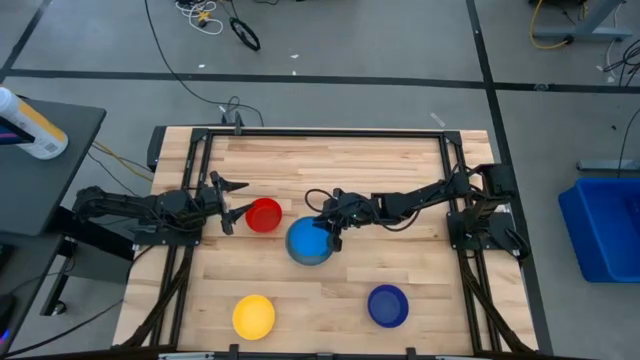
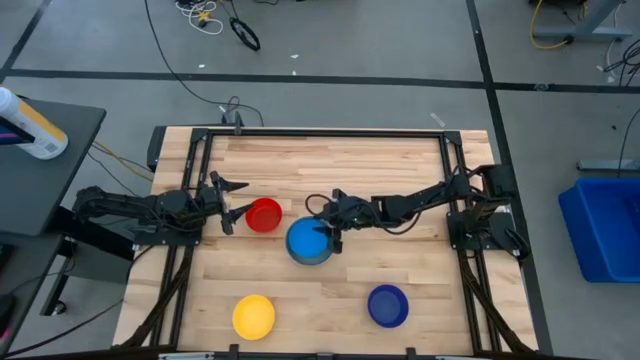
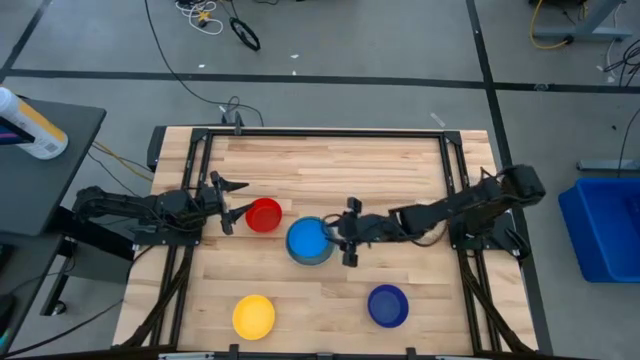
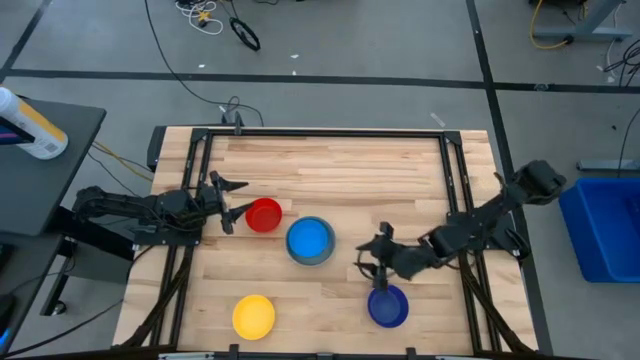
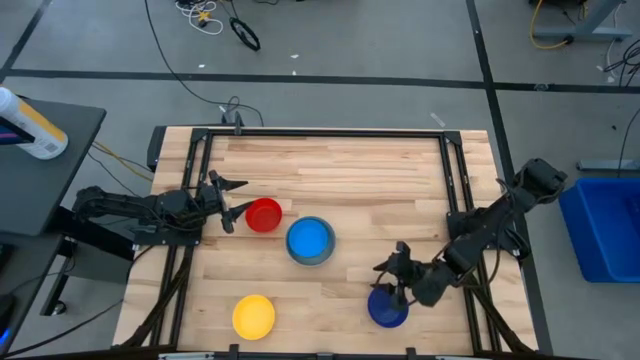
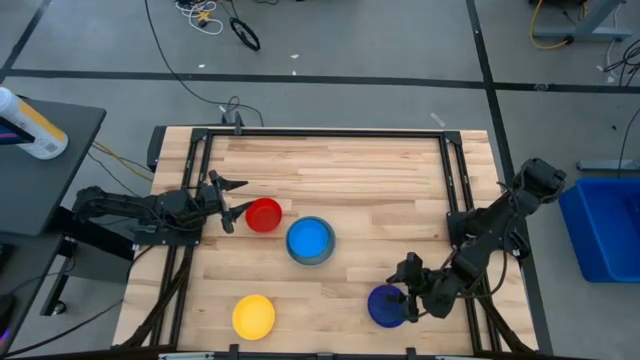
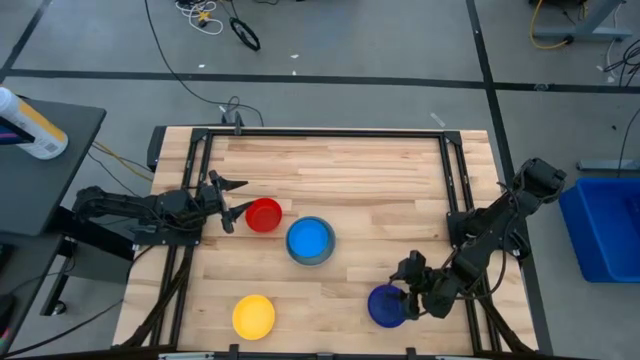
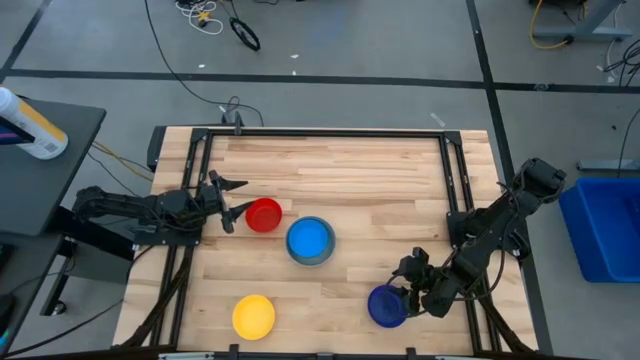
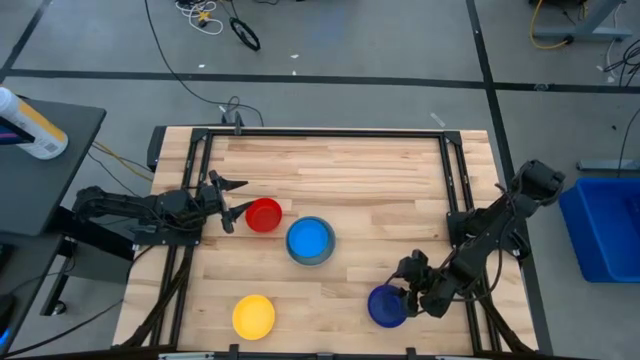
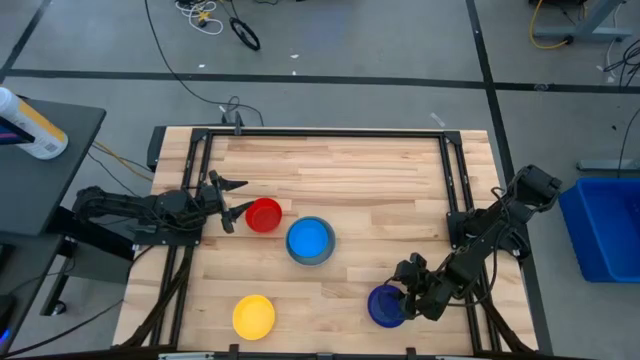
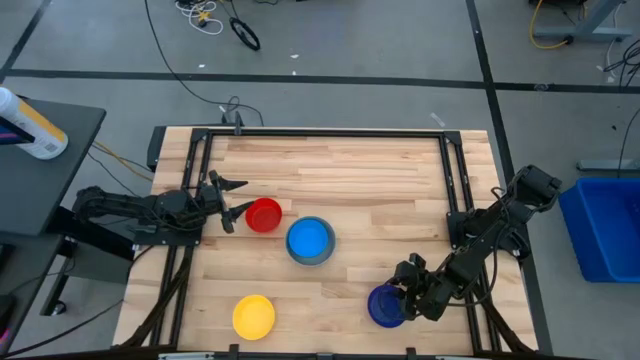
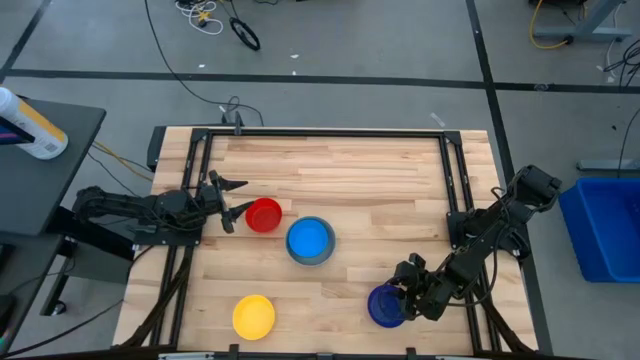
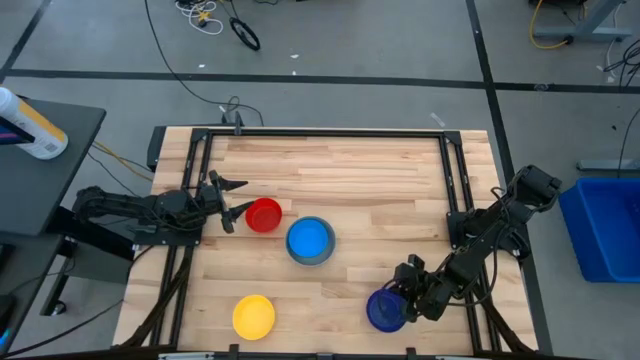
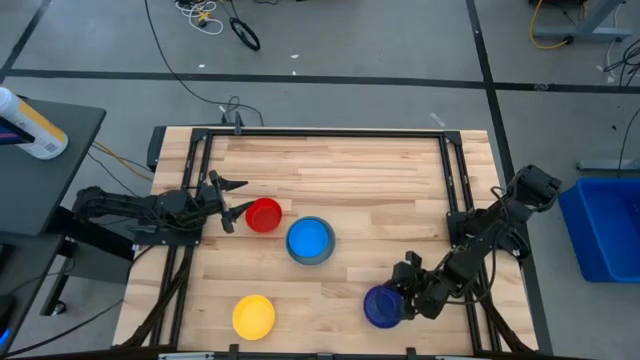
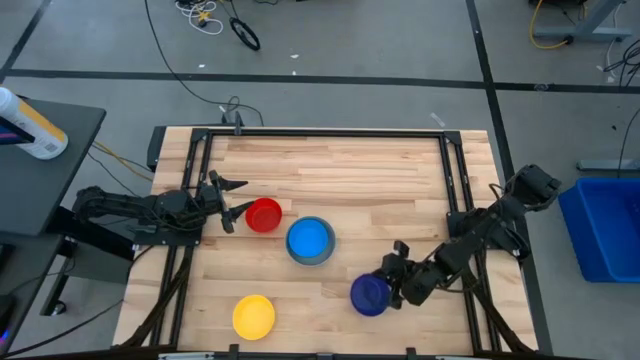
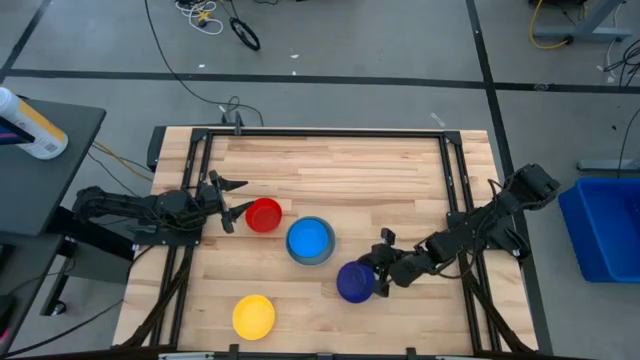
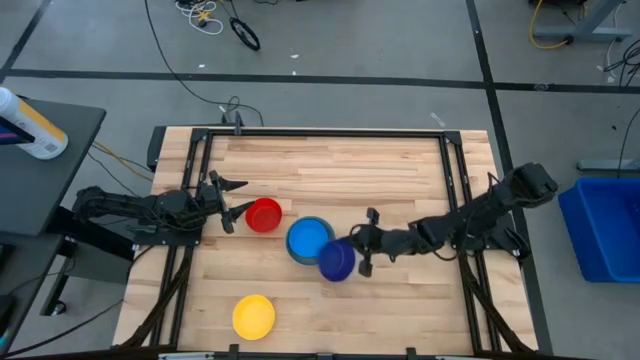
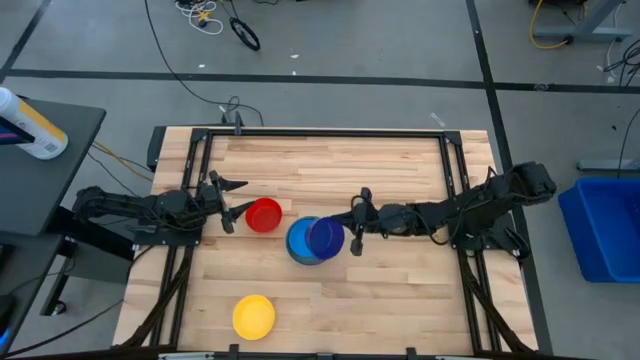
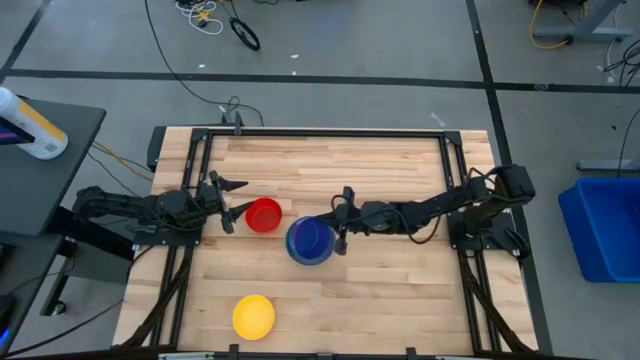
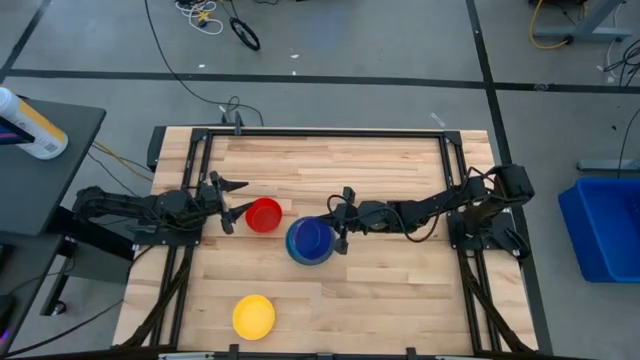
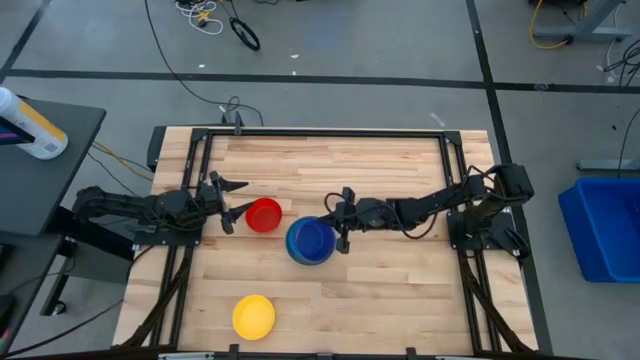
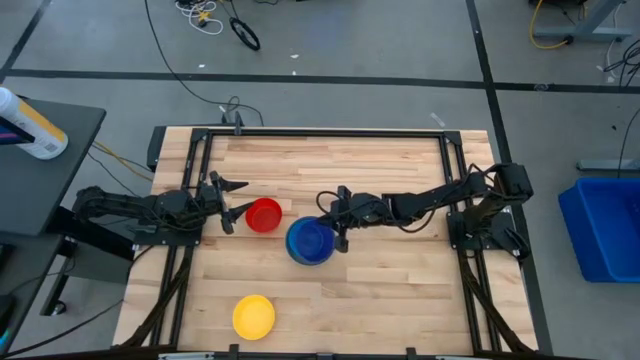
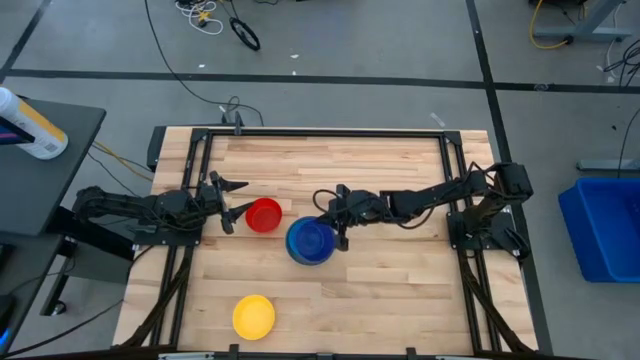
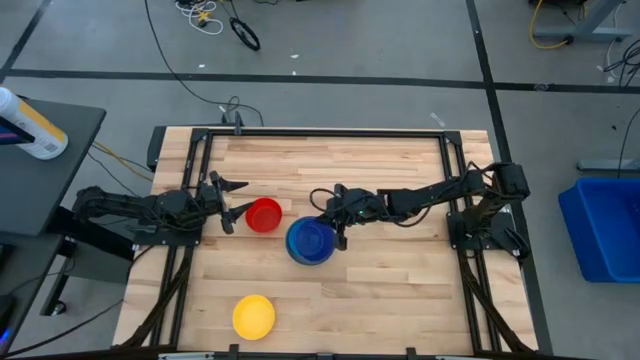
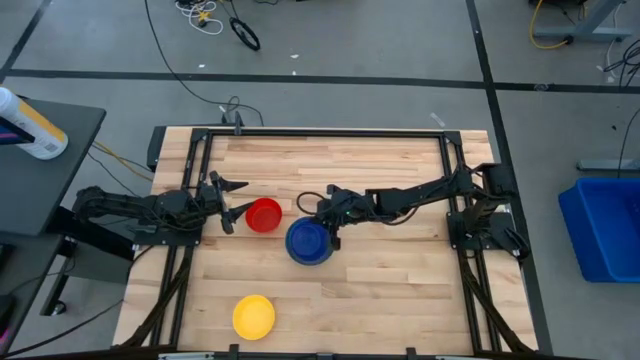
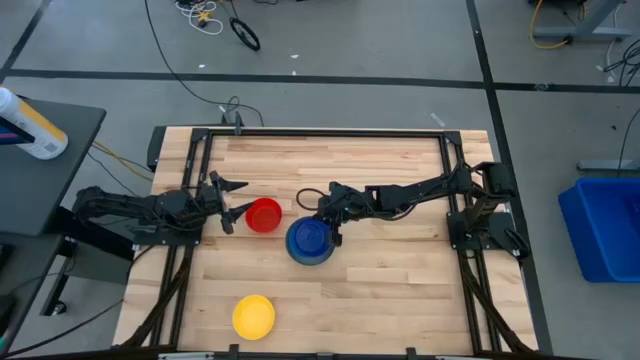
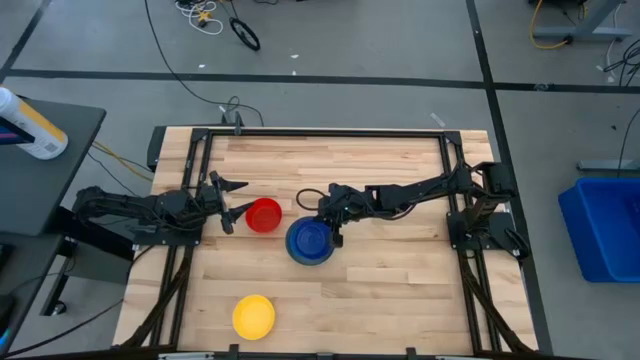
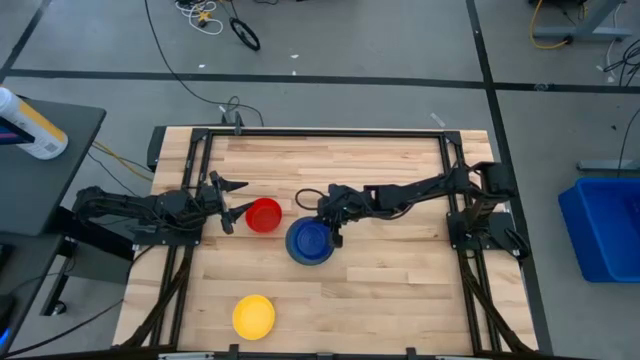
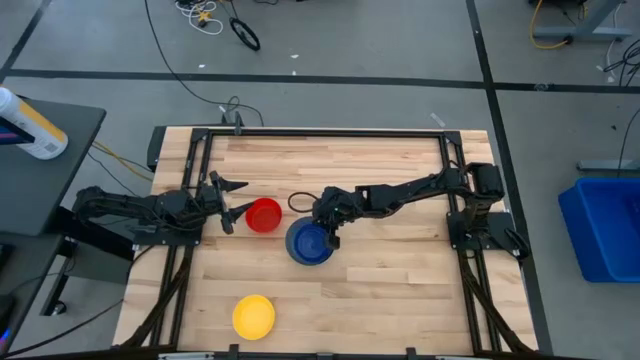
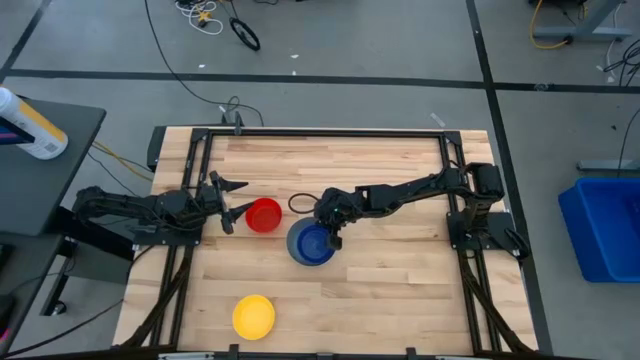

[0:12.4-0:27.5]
Stack the dark blue bowl on the blue bowl
